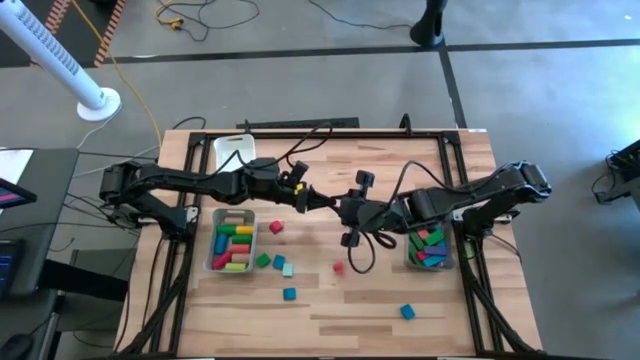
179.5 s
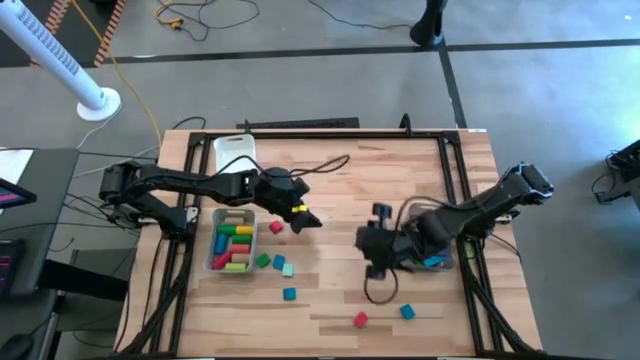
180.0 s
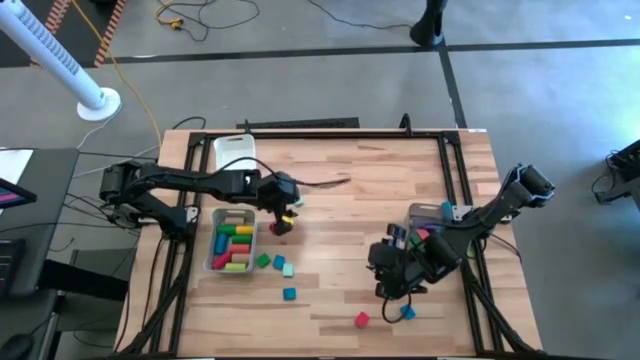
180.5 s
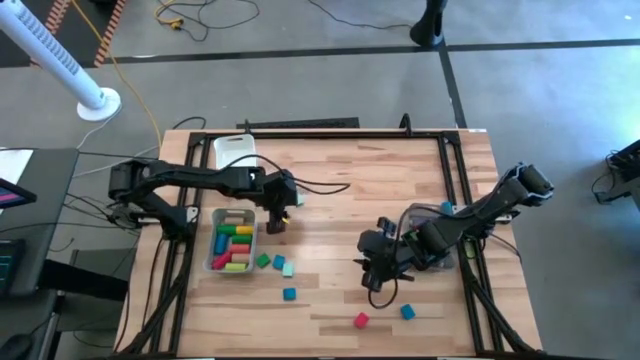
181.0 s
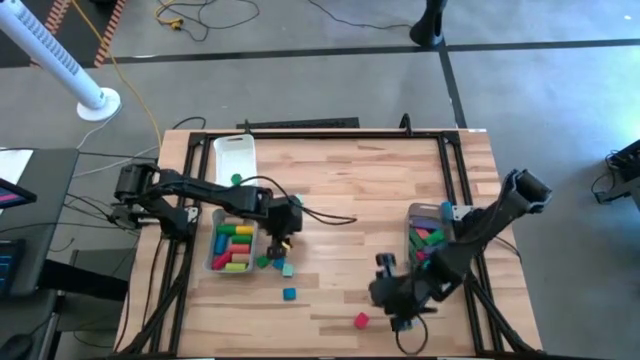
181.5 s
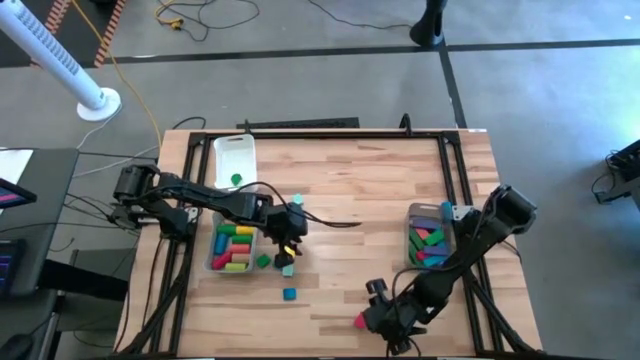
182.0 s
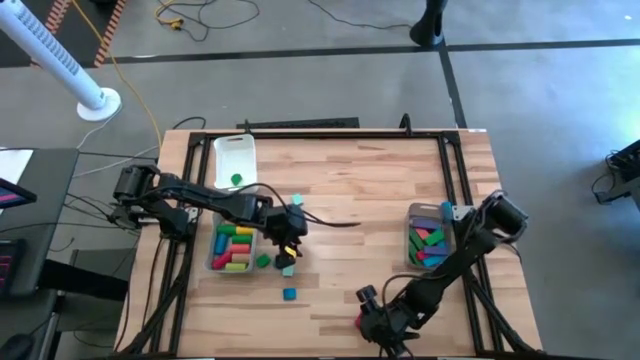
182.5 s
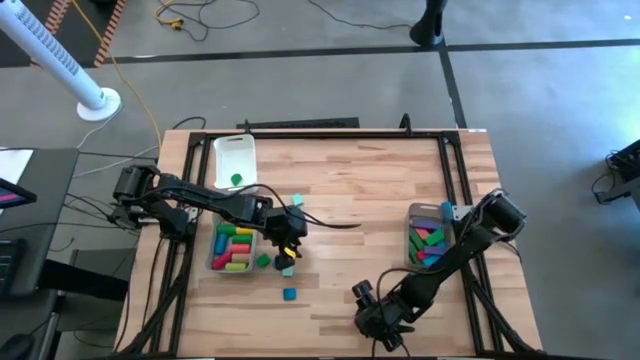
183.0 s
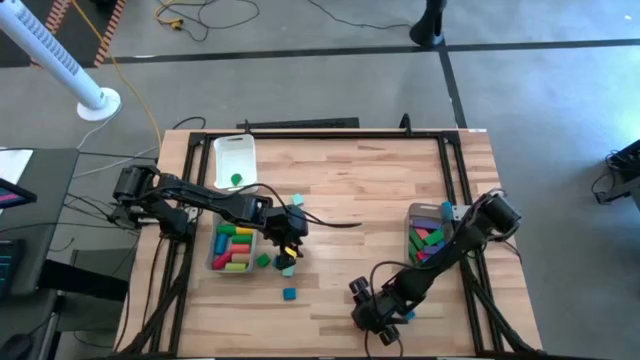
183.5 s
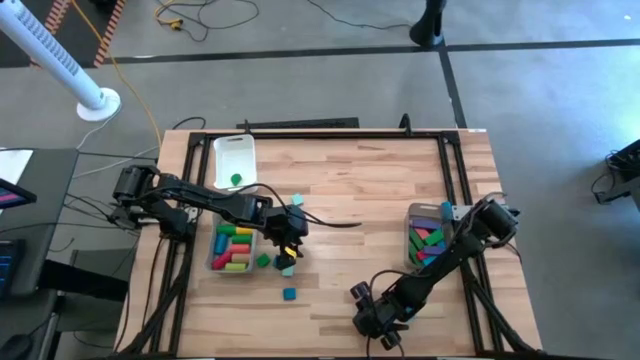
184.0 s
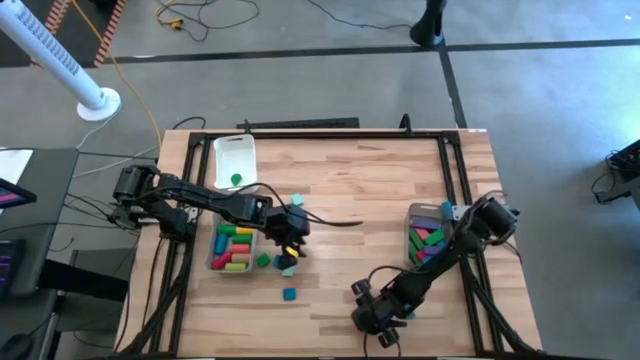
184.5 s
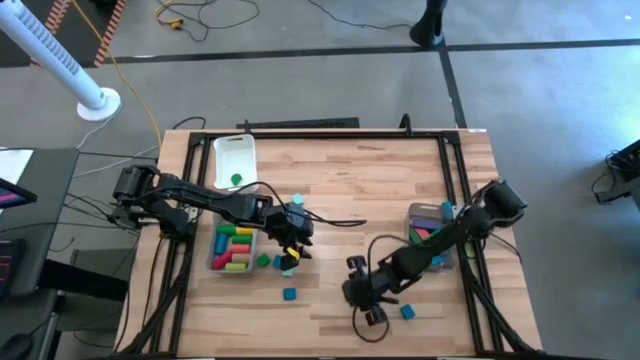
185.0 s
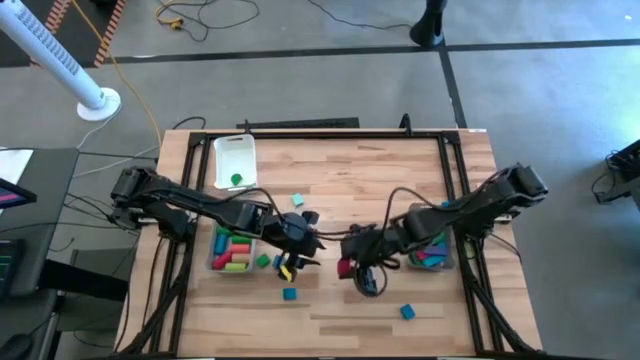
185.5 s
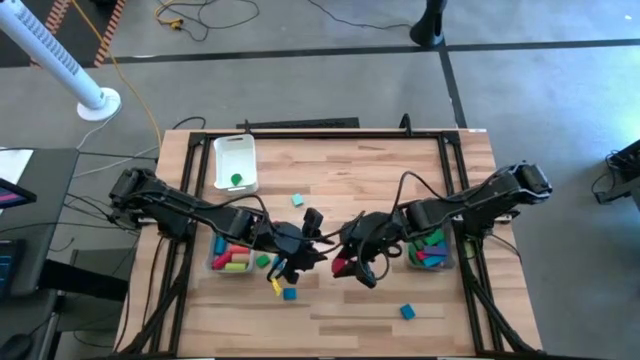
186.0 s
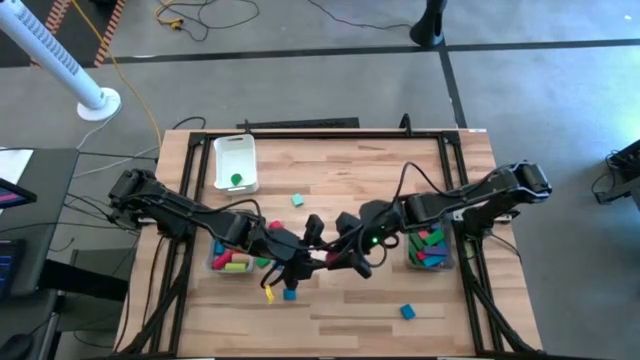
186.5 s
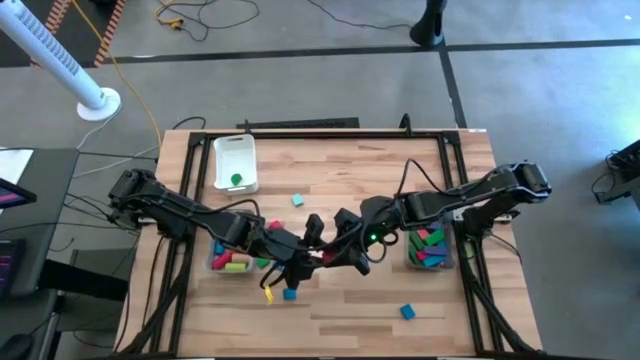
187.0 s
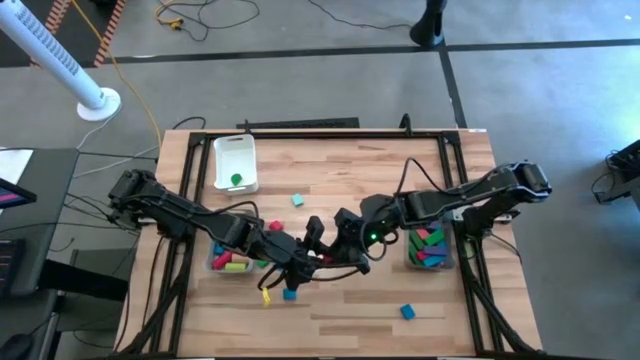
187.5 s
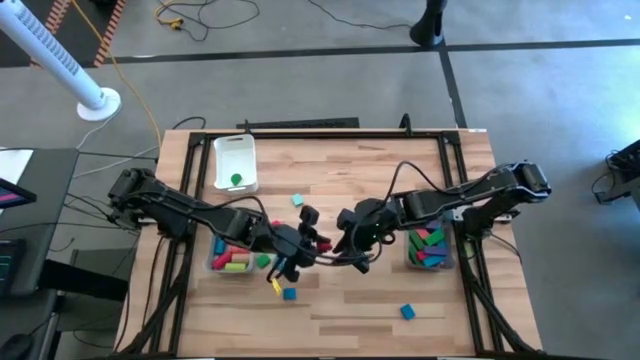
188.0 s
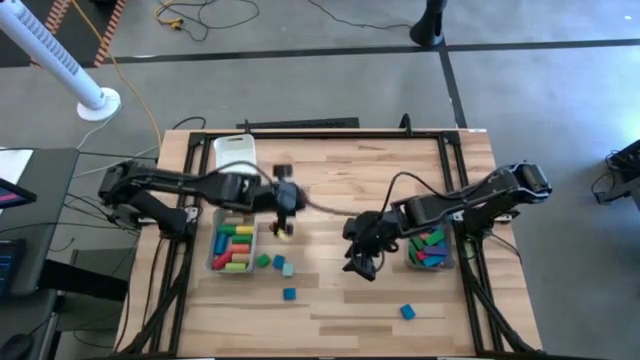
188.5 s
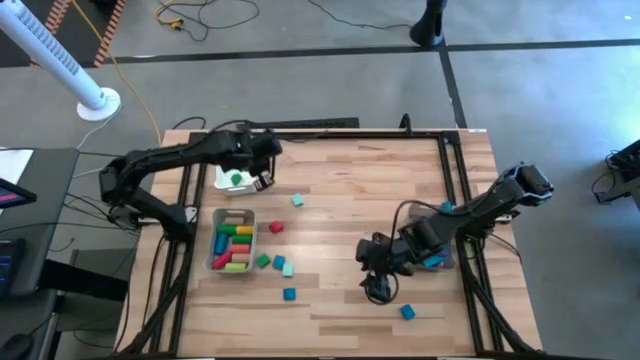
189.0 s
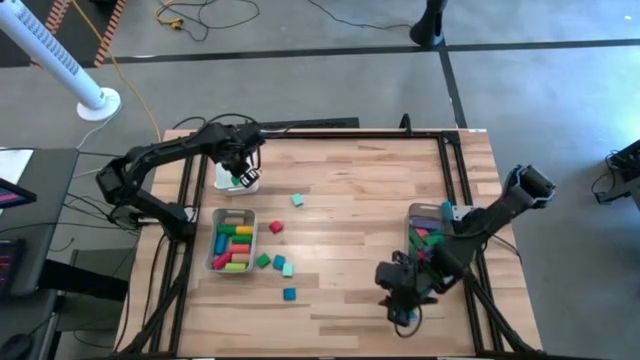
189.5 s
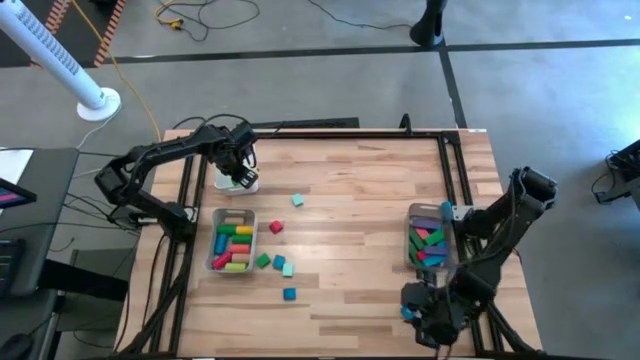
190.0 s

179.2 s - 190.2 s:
Task: Sort blocks by size
Put the red semicircular block into the white bin

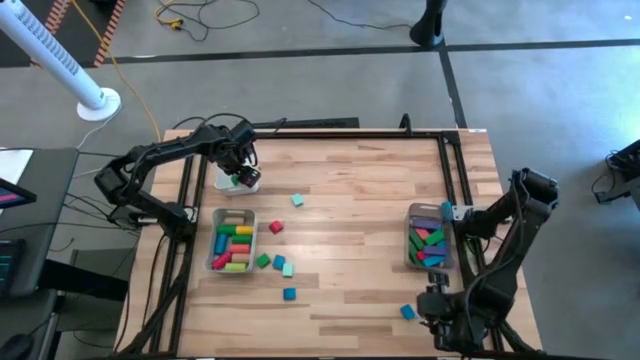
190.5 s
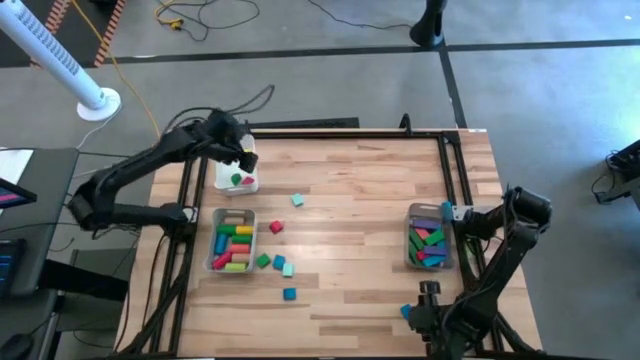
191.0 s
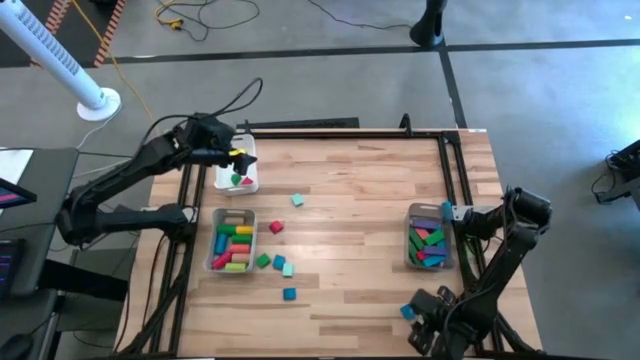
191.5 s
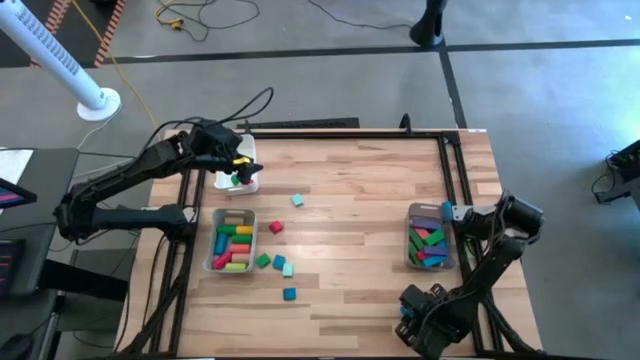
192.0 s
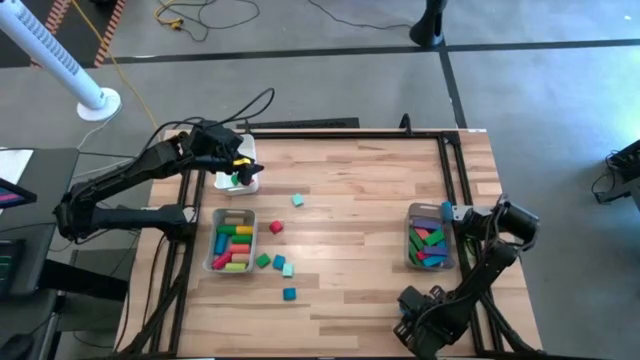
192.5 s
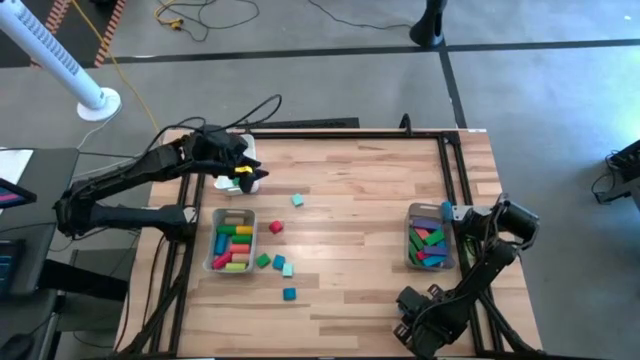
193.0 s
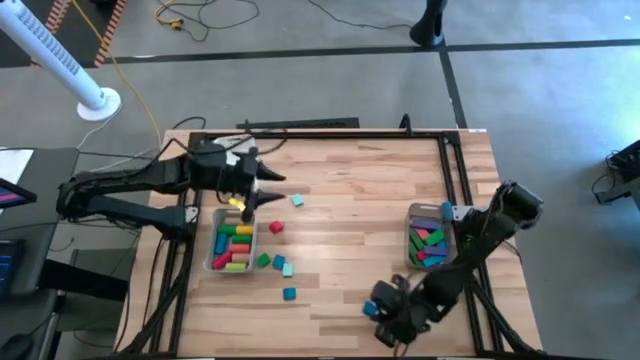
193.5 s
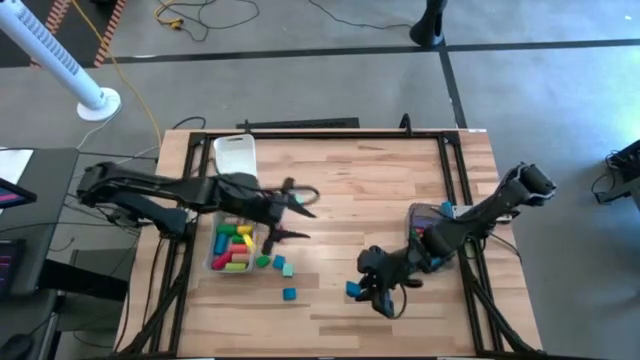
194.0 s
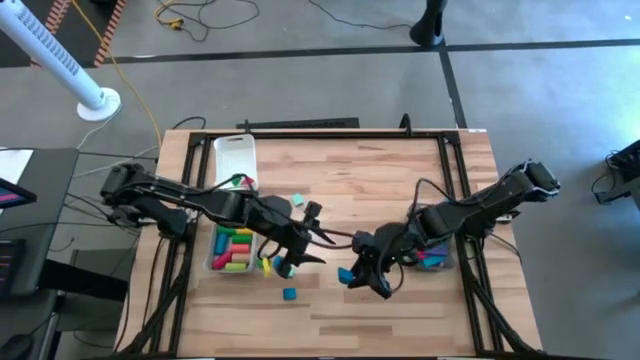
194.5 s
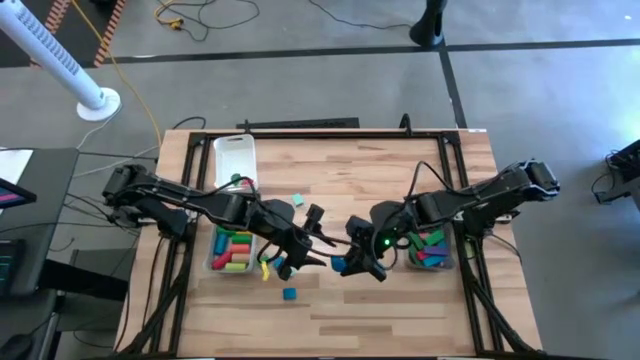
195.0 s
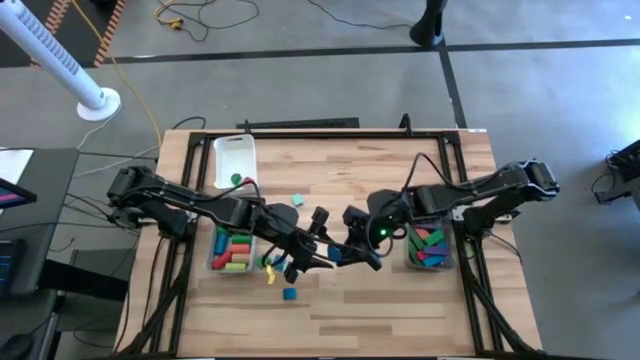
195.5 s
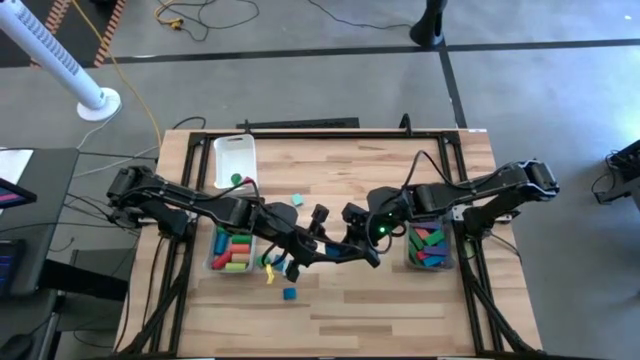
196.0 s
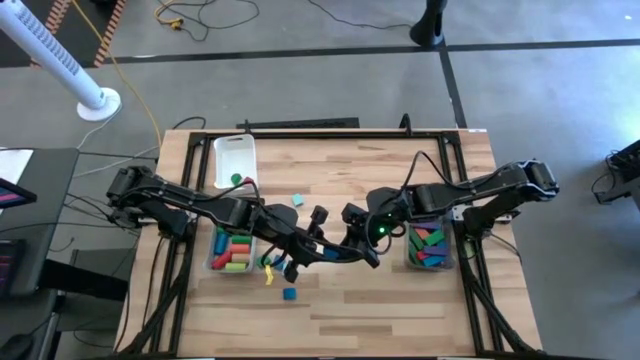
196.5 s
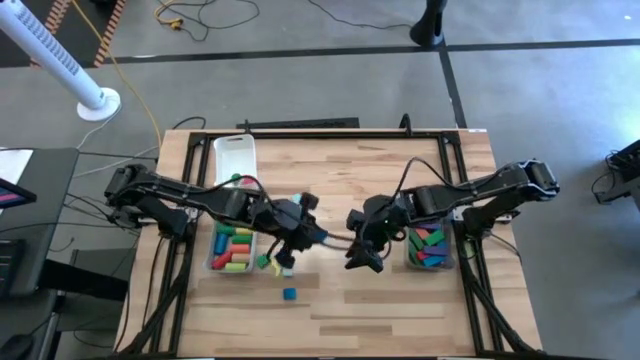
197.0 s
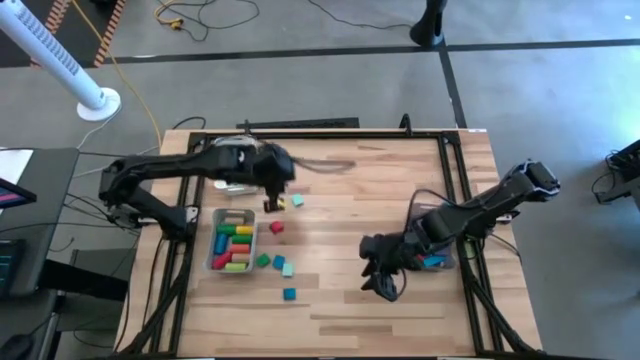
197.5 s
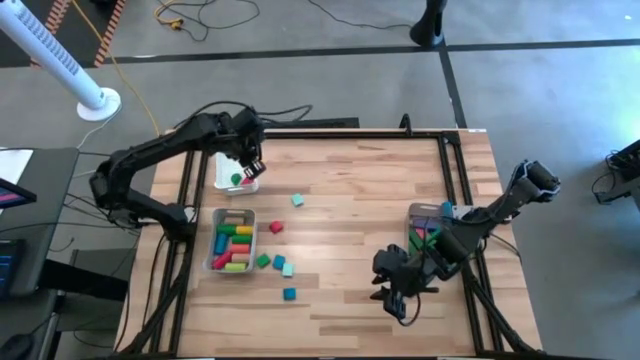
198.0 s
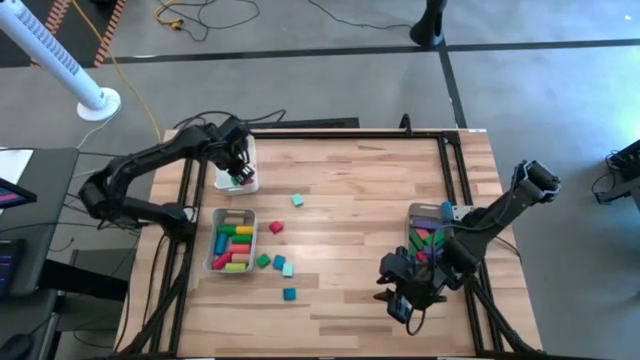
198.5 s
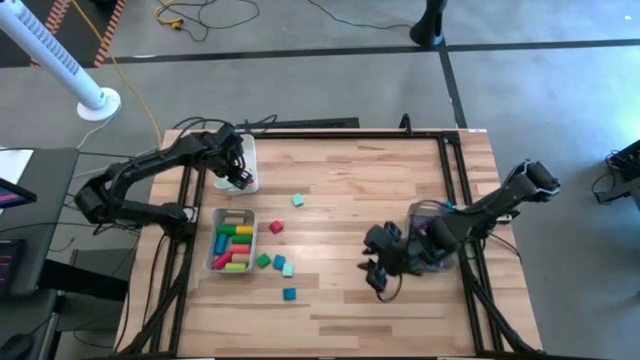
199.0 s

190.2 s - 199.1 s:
Put the blue semicircular block into the white bin

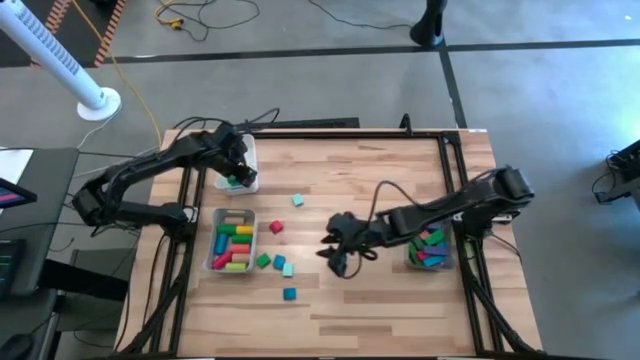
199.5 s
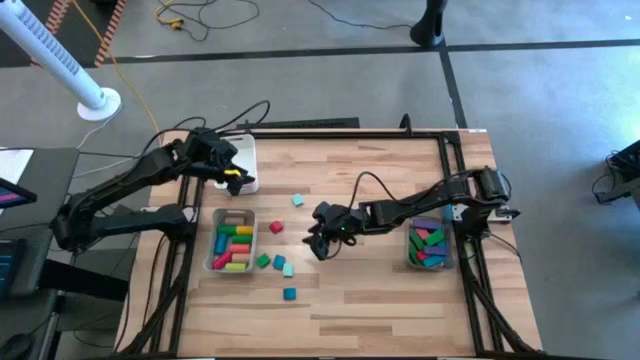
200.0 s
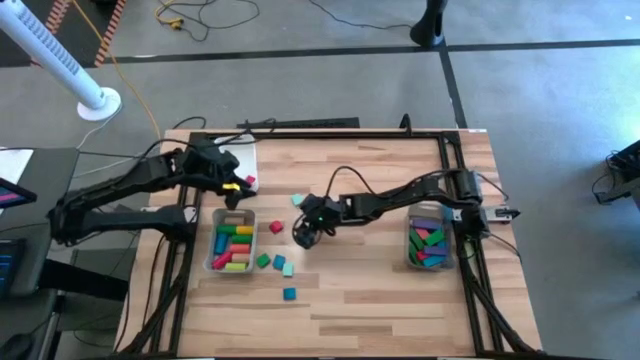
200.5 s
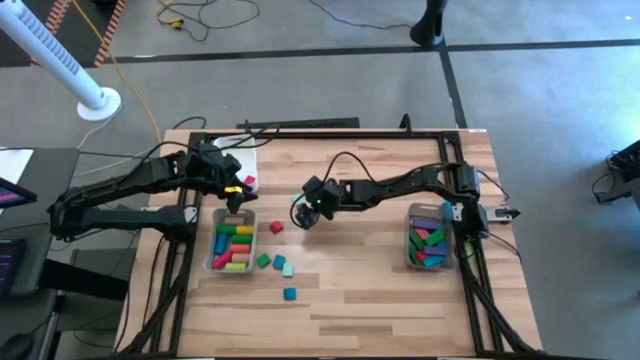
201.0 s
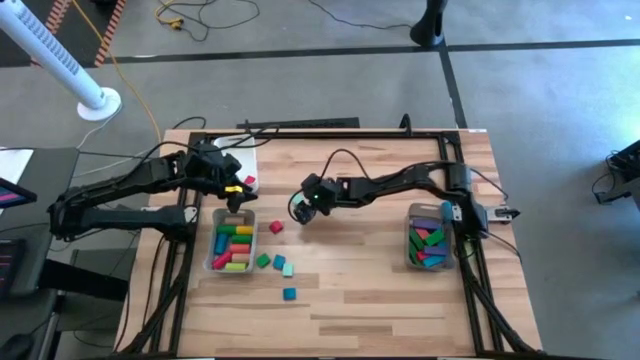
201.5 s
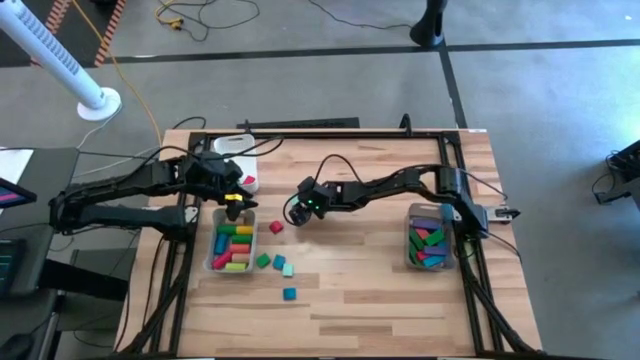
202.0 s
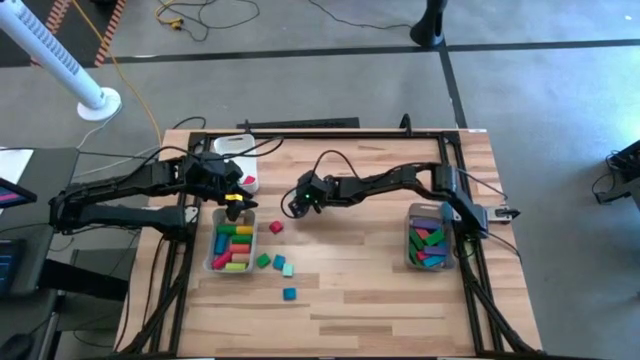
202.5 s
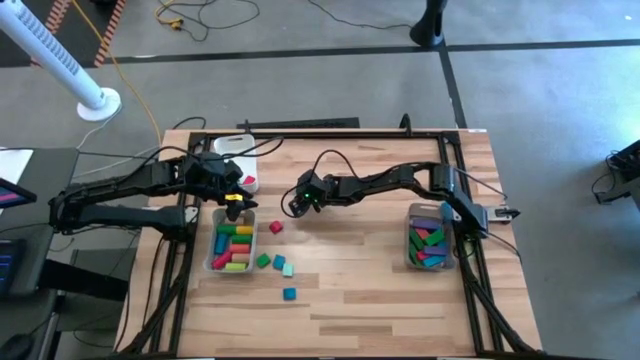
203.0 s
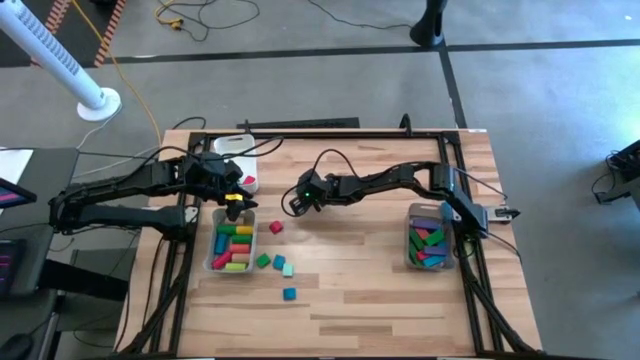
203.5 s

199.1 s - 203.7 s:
Put the light blue semicircular block into the white bin
